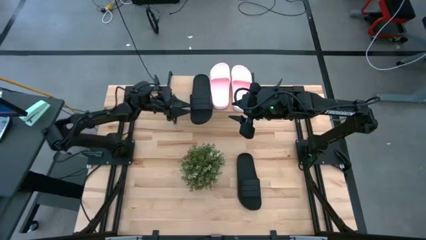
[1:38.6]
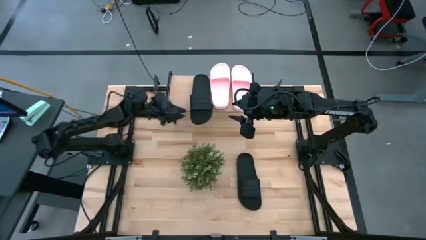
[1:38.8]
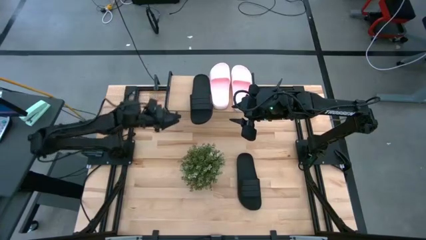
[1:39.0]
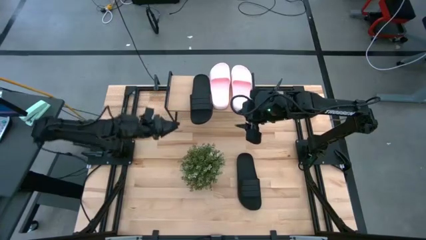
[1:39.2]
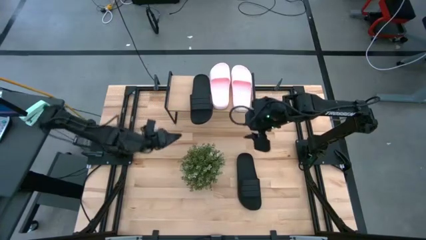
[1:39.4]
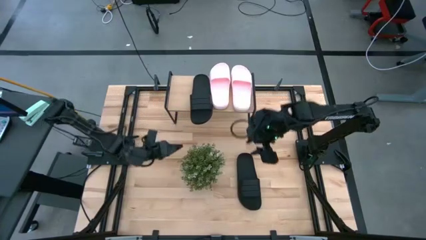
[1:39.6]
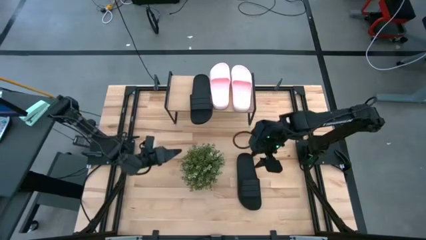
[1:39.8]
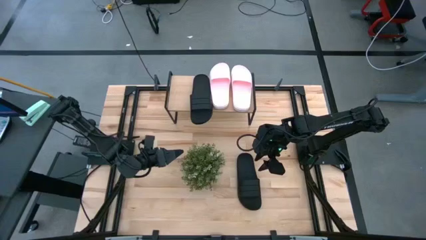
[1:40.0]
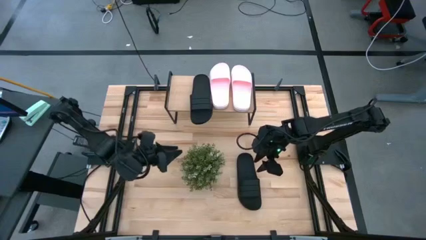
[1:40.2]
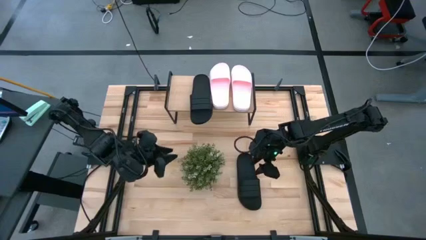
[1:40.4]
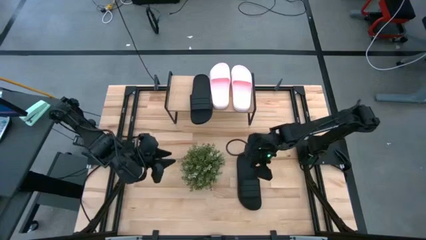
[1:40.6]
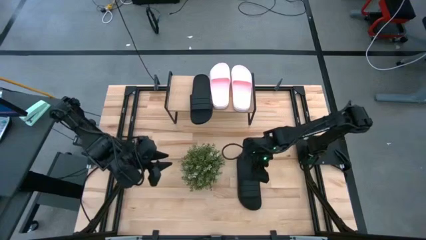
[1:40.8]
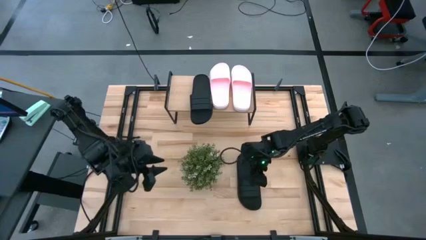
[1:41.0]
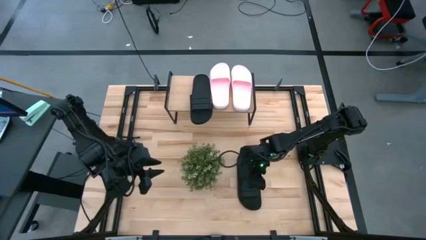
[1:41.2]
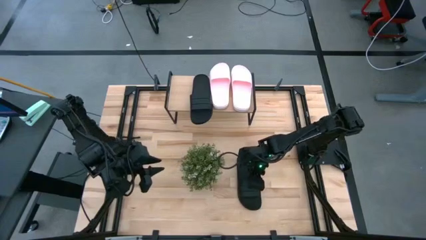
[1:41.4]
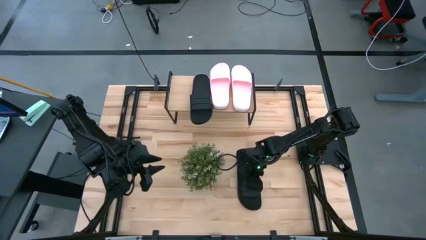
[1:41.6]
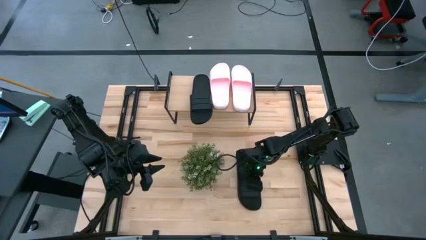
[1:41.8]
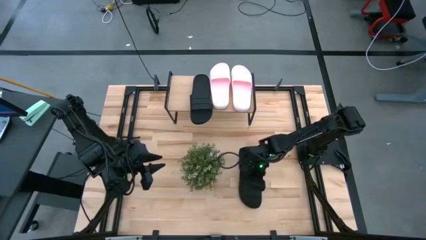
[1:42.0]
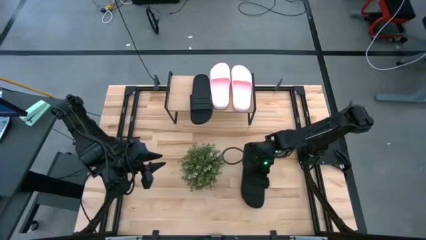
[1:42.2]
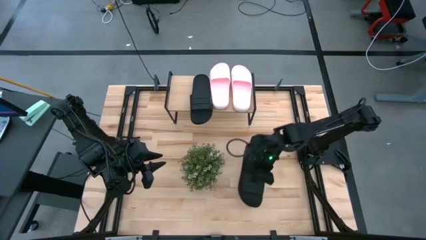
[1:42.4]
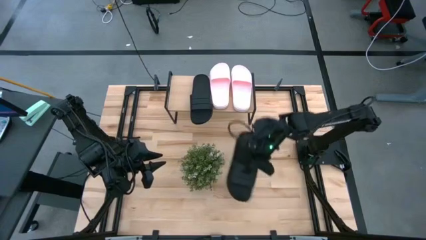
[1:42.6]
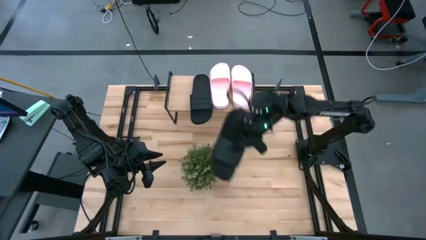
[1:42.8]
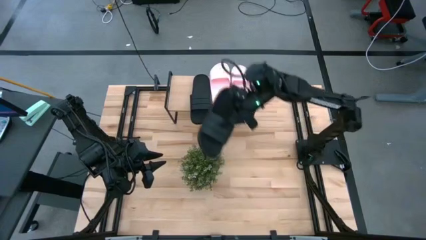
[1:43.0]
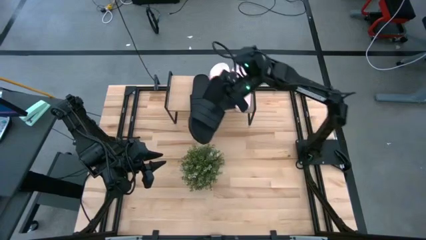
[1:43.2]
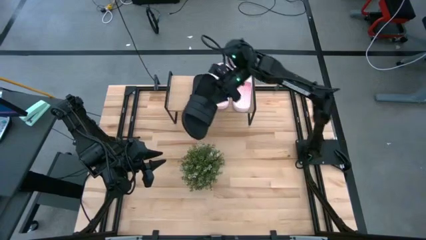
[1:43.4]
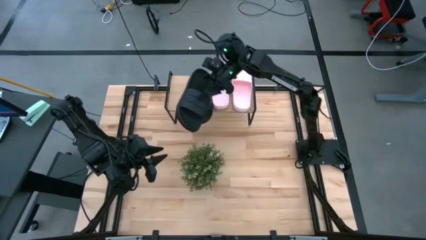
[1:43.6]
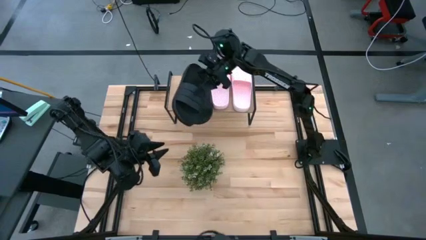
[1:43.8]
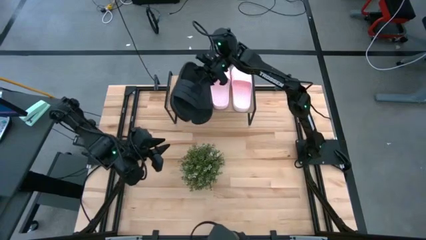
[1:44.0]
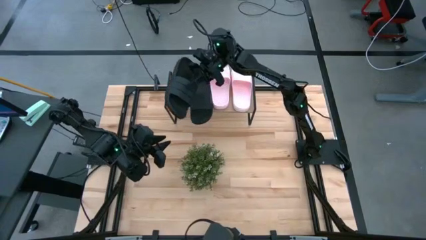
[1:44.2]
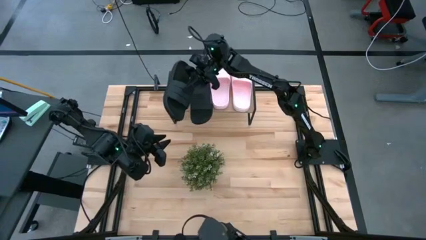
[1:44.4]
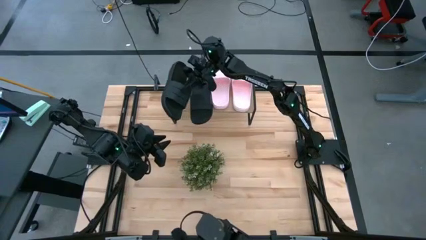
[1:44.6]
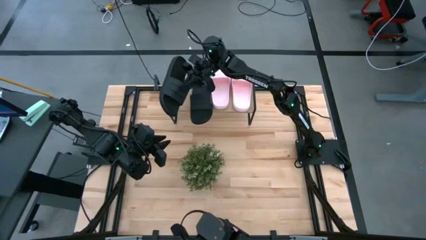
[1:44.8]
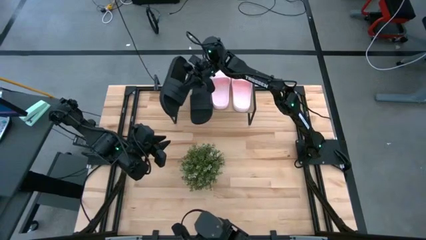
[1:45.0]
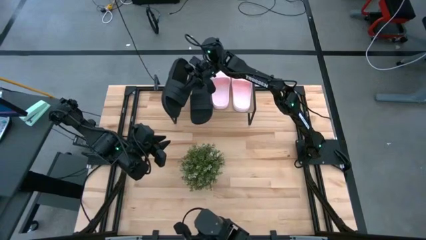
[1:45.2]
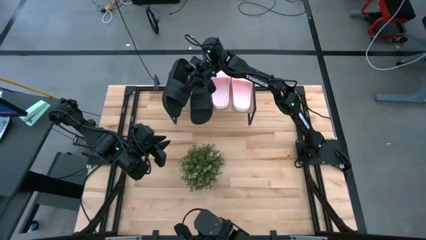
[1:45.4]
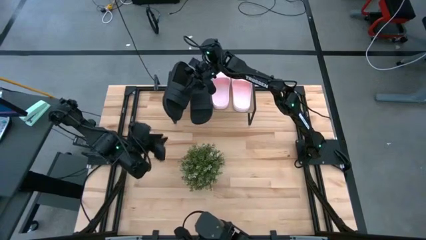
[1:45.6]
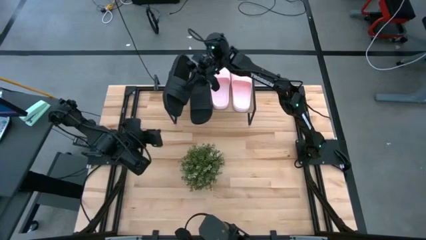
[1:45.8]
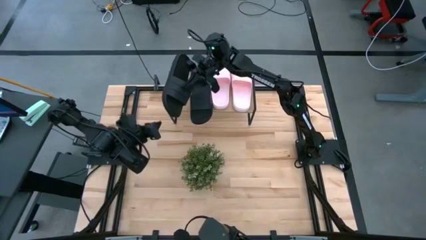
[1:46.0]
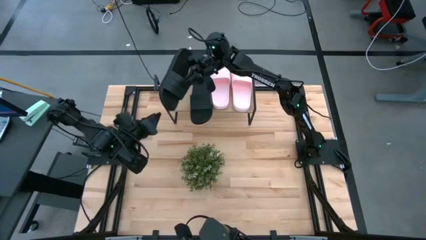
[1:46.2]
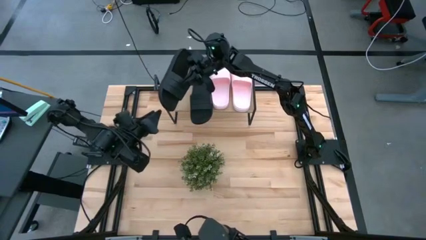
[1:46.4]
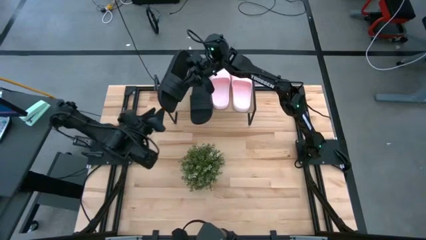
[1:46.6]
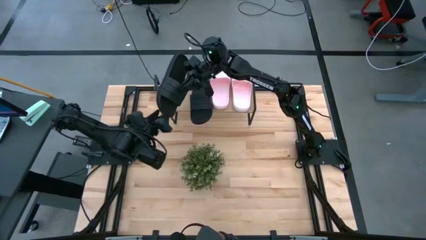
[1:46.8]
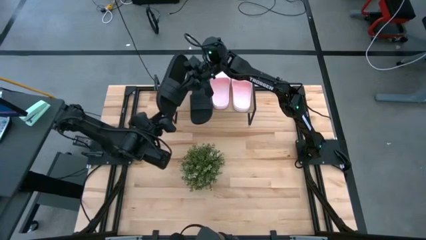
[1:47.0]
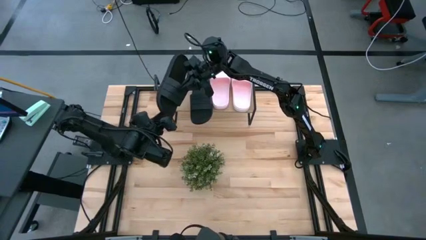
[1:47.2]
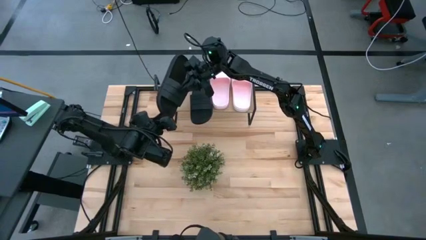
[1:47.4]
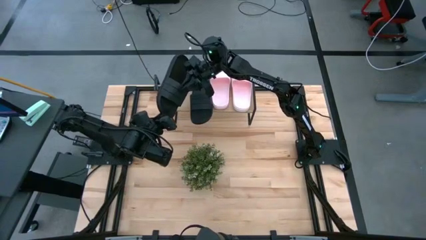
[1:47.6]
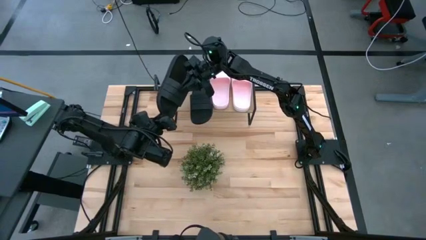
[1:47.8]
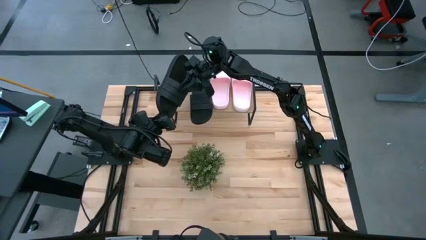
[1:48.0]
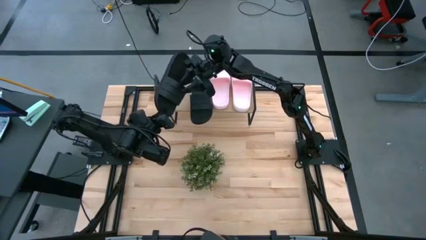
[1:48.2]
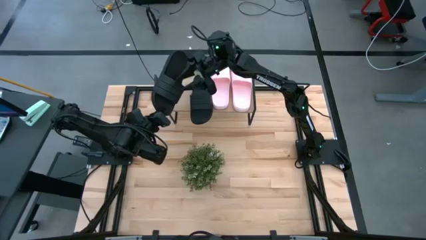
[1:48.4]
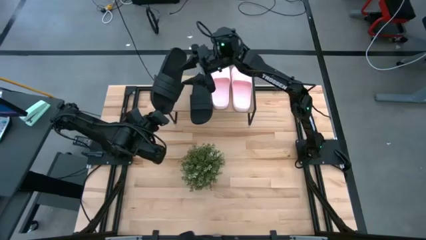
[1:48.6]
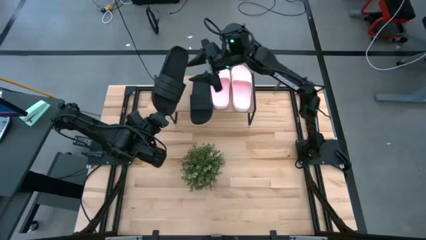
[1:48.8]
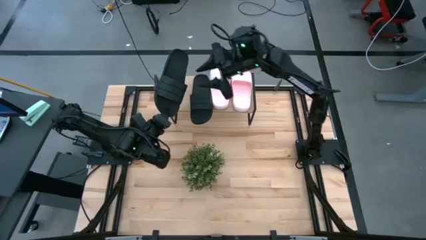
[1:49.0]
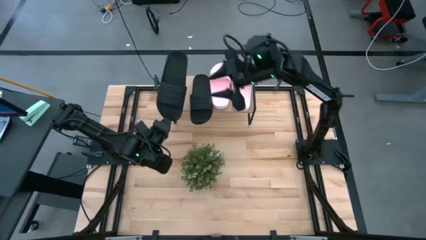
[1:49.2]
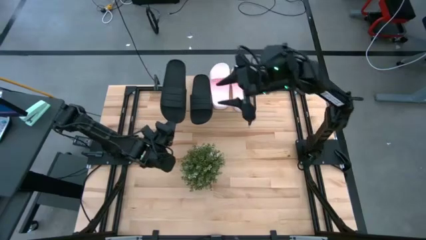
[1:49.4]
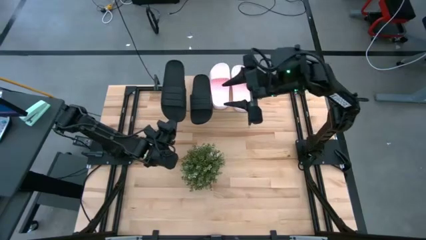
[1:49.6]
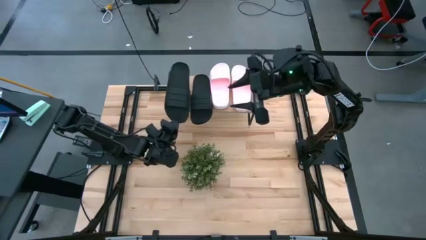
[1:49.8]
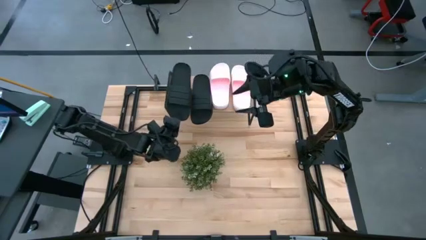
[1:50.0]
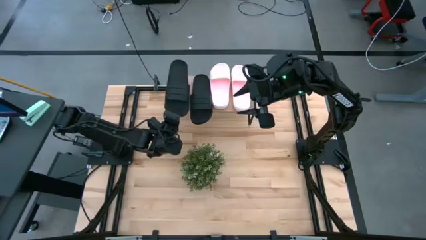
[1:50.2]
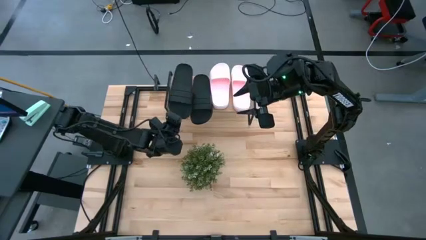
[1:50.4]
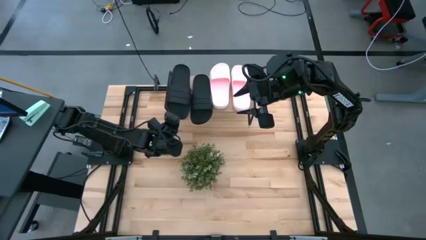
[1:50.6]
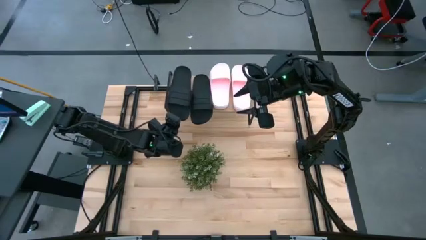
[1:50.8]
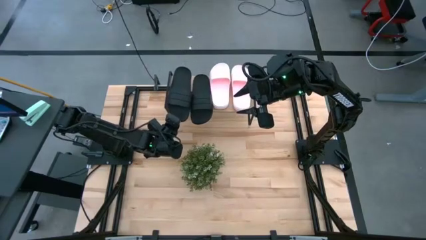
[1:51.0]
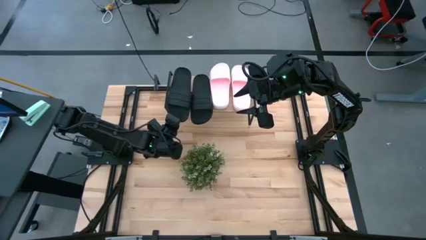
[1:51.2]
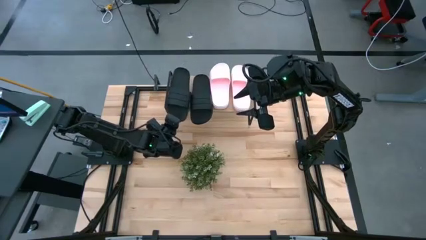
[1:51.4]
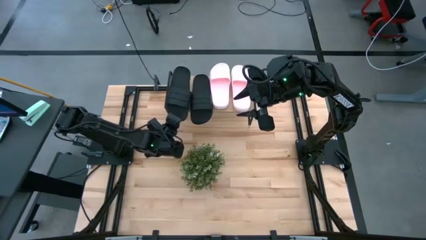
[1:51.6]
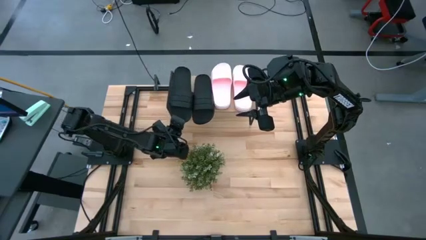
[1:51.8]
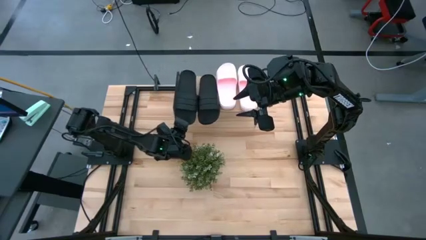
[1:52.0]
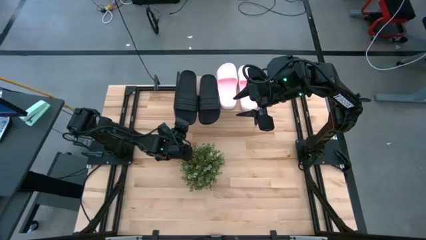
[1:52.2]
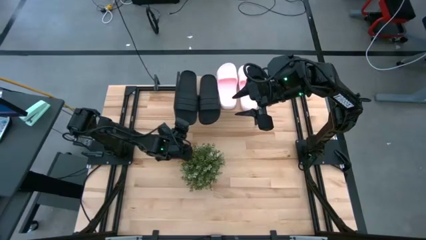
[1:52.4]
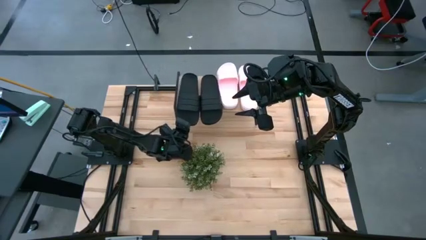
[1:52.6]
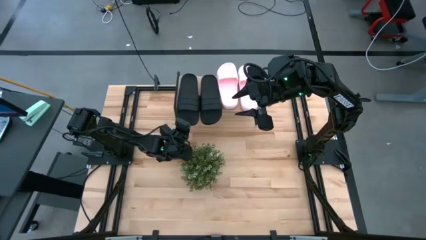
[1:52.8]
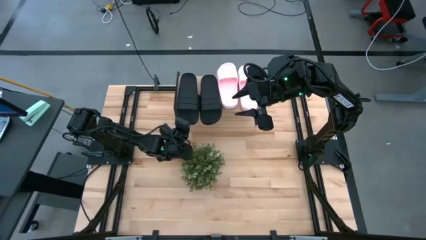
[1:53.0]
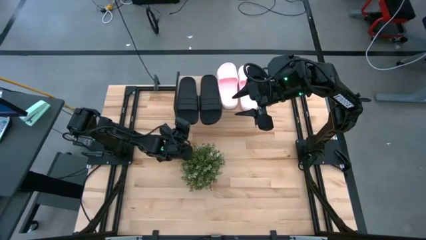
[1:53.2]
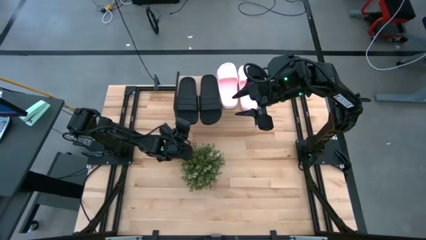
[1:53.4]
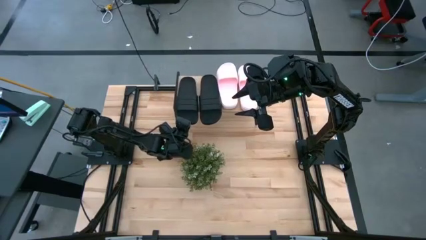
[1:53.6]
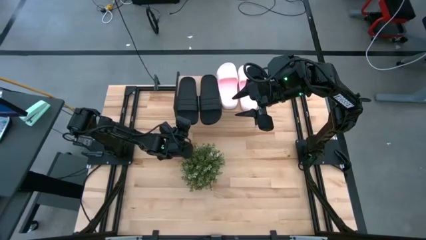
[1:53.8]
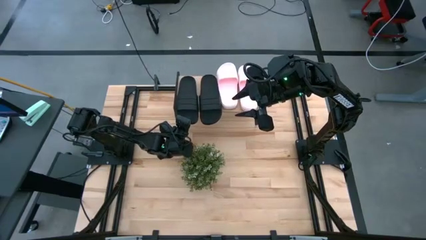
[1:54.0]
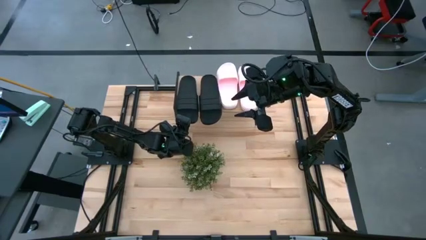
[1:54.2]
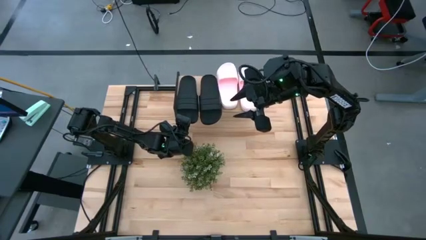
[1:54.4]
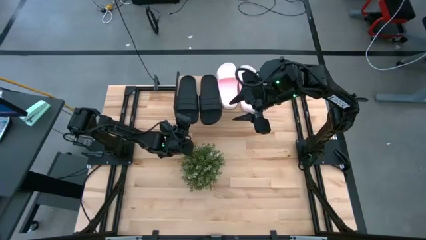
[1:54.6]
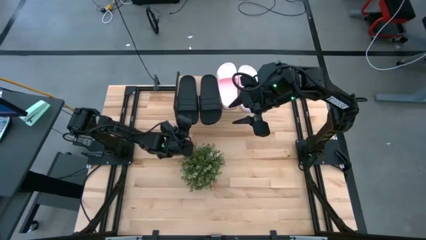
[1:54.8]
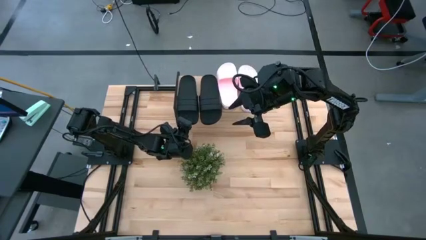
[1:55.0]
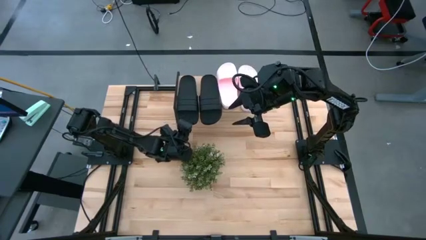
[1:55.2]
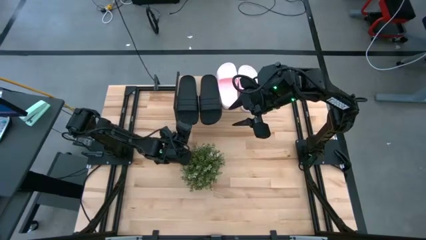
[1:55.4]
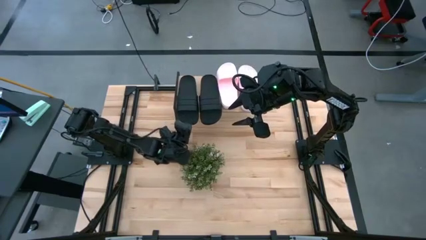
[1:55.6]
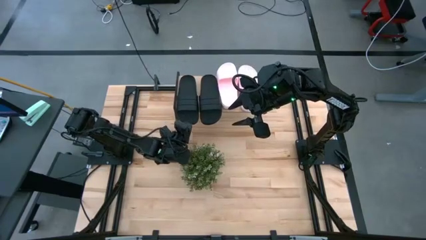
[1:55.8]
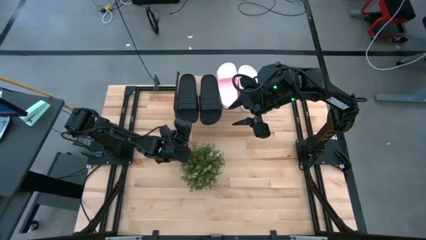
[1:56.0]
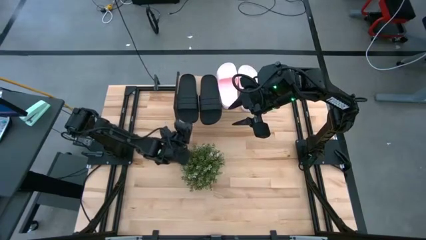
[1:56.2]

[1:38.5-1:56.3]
Task: Pick and place slides into the shelf
Put the black slipper on the shelf
